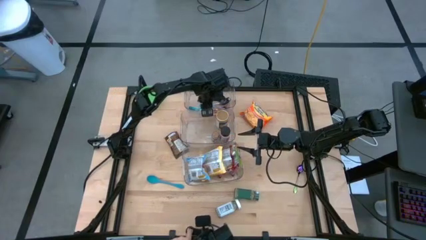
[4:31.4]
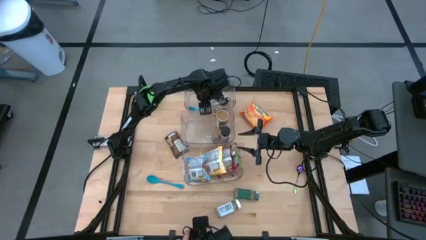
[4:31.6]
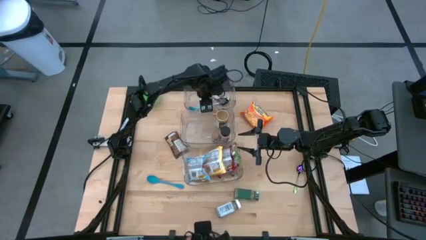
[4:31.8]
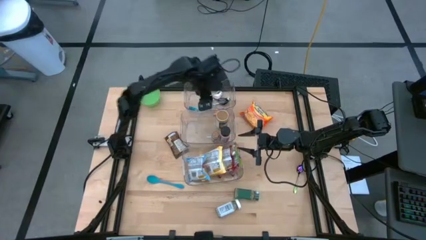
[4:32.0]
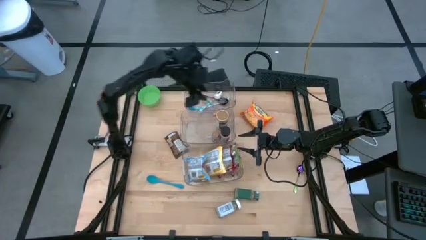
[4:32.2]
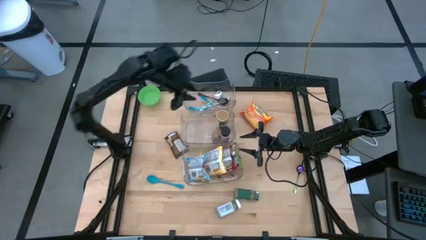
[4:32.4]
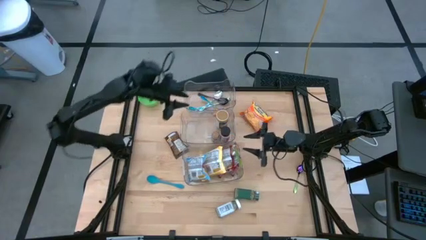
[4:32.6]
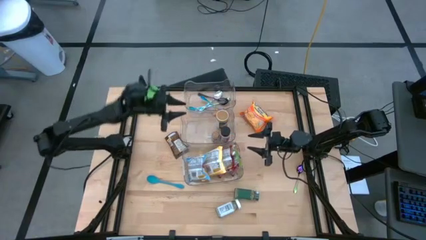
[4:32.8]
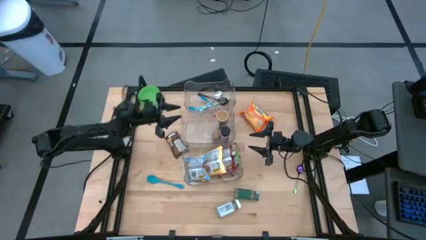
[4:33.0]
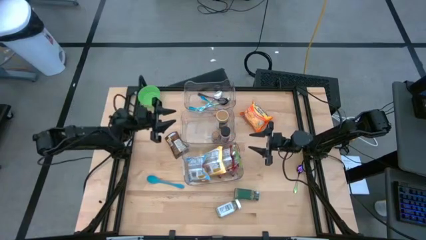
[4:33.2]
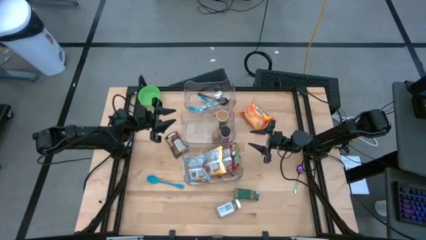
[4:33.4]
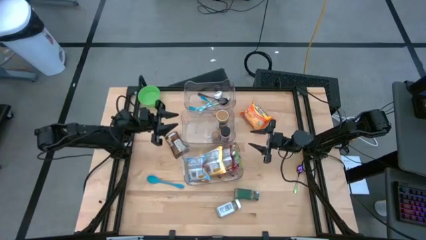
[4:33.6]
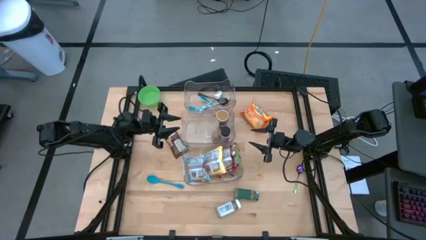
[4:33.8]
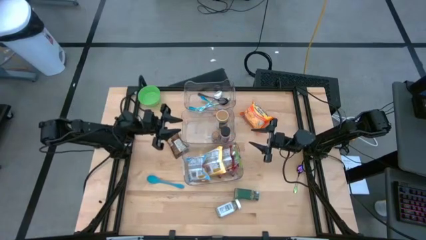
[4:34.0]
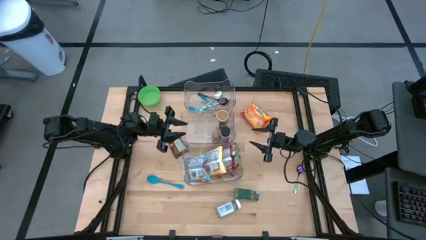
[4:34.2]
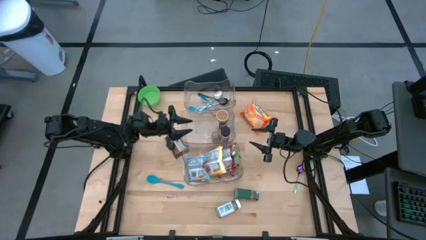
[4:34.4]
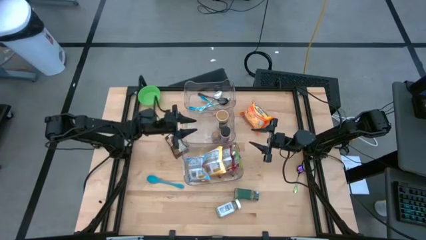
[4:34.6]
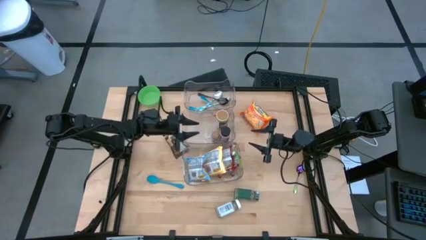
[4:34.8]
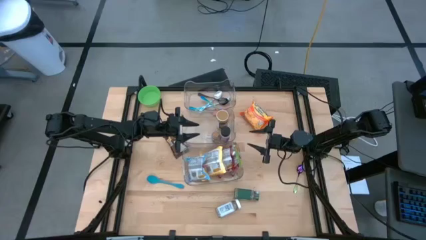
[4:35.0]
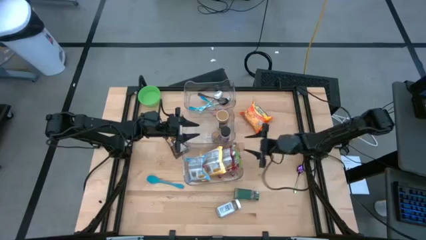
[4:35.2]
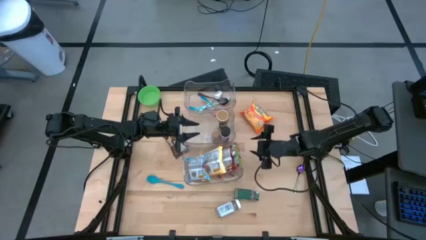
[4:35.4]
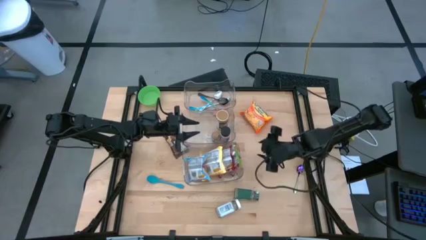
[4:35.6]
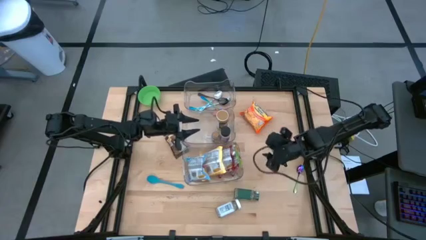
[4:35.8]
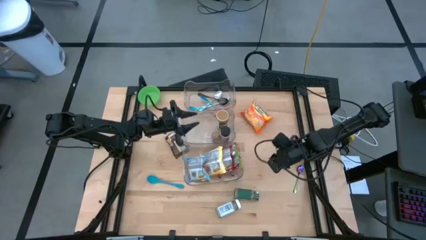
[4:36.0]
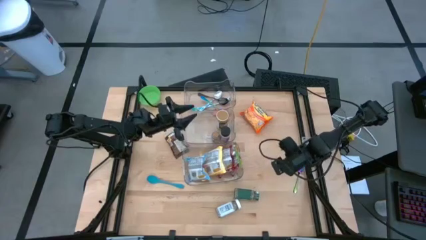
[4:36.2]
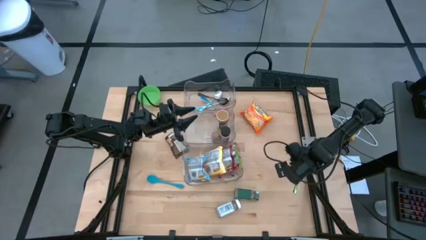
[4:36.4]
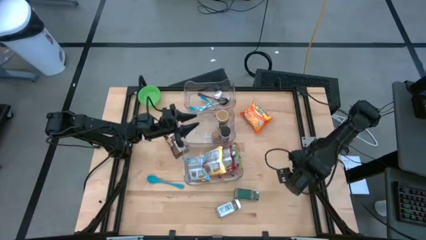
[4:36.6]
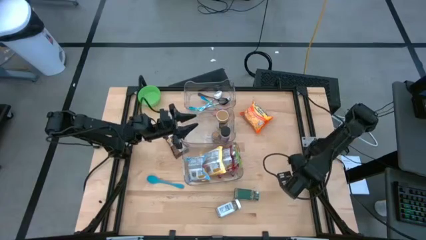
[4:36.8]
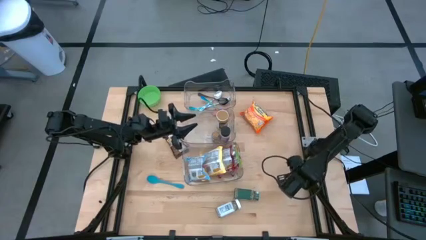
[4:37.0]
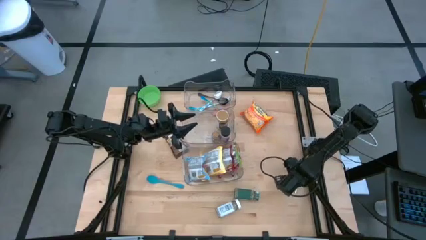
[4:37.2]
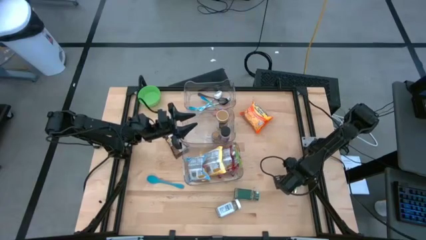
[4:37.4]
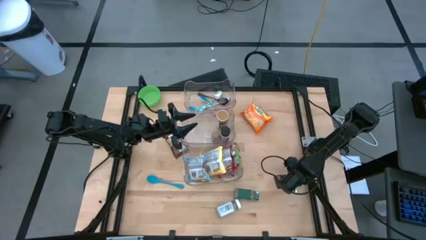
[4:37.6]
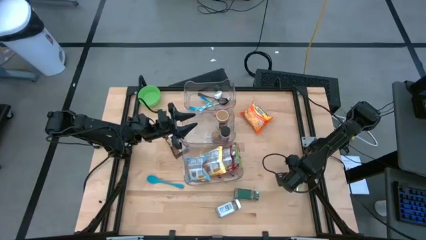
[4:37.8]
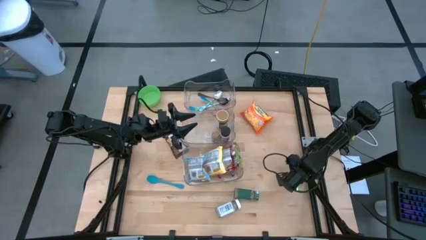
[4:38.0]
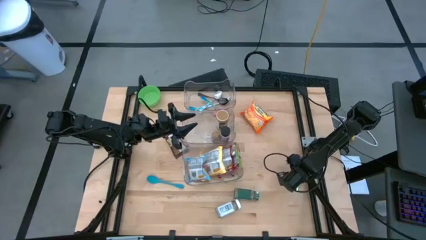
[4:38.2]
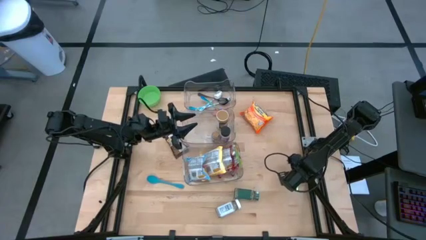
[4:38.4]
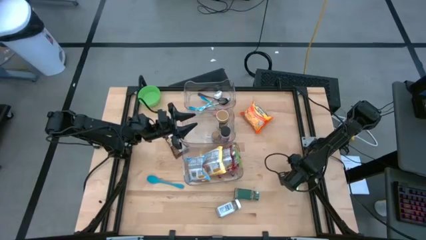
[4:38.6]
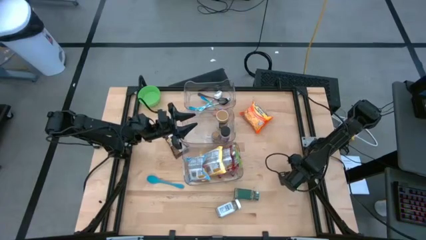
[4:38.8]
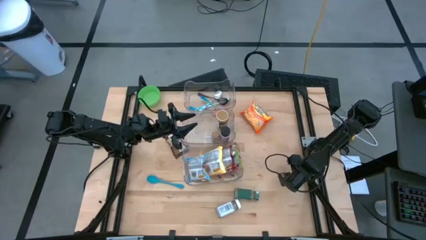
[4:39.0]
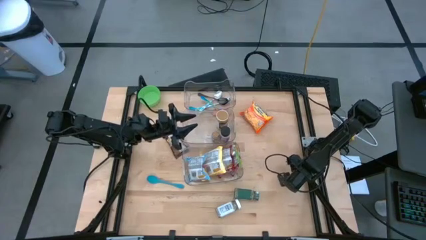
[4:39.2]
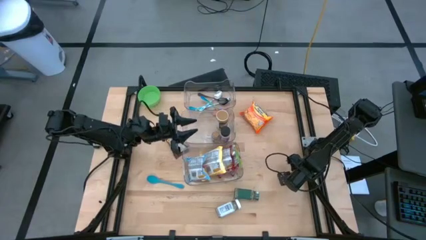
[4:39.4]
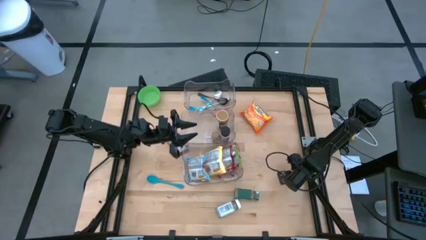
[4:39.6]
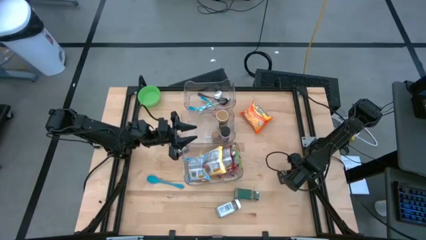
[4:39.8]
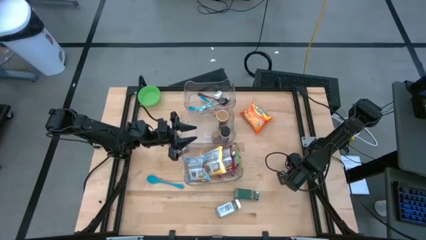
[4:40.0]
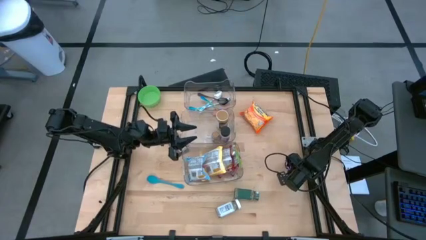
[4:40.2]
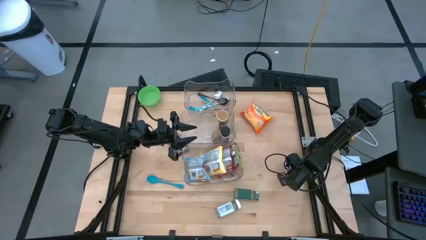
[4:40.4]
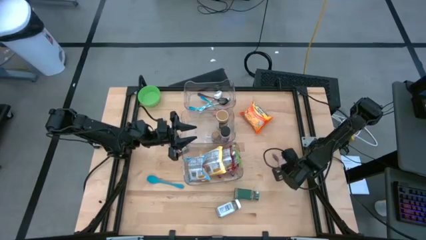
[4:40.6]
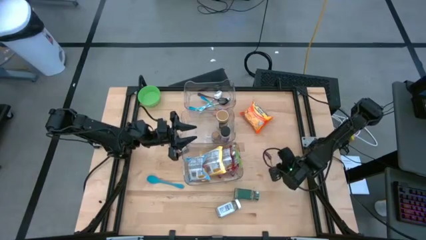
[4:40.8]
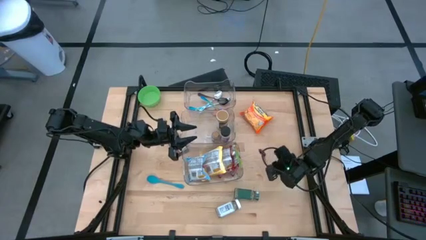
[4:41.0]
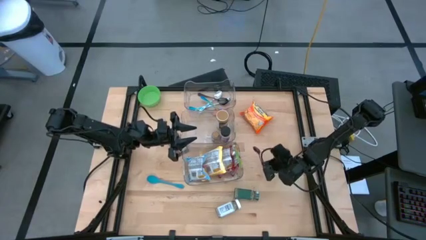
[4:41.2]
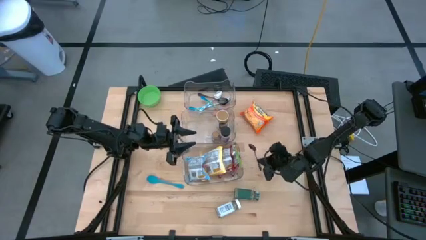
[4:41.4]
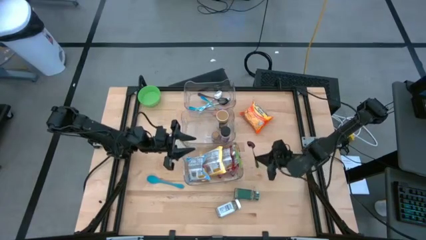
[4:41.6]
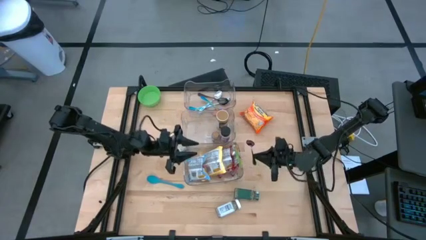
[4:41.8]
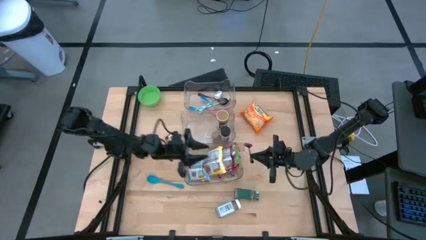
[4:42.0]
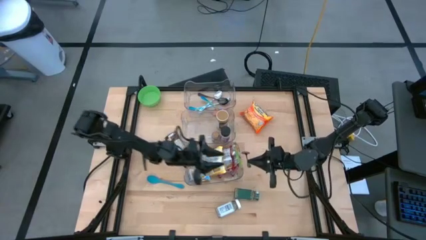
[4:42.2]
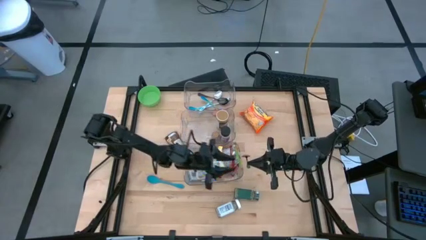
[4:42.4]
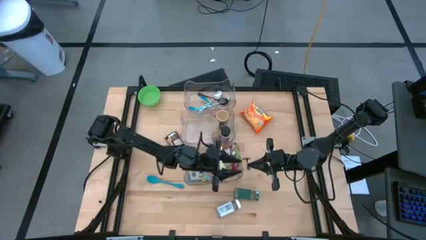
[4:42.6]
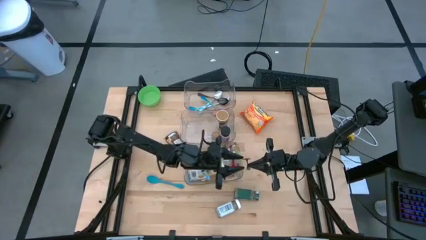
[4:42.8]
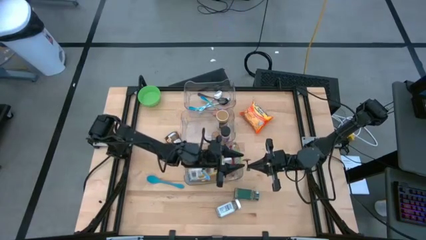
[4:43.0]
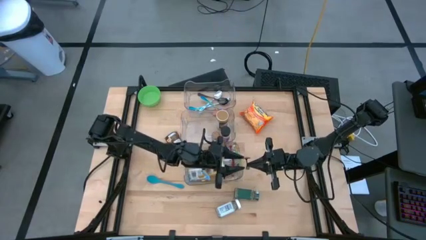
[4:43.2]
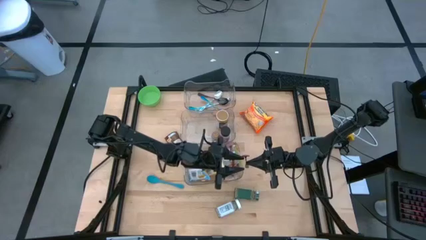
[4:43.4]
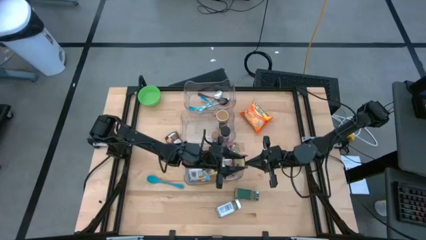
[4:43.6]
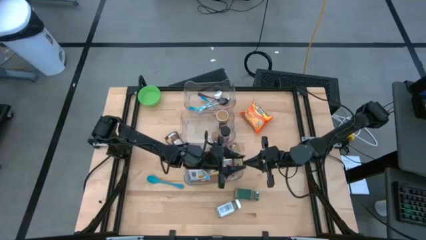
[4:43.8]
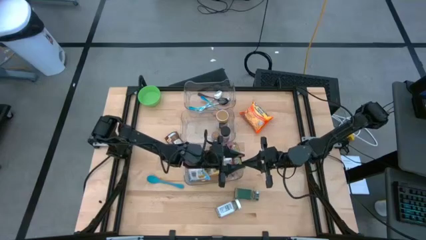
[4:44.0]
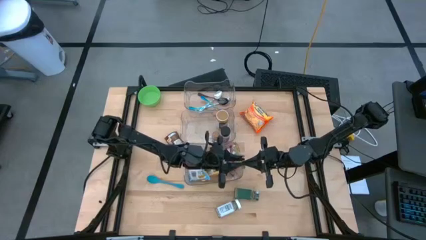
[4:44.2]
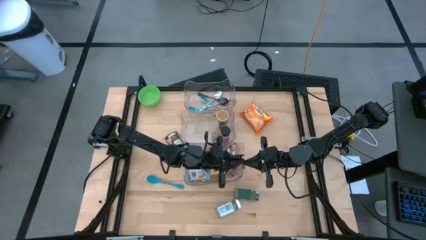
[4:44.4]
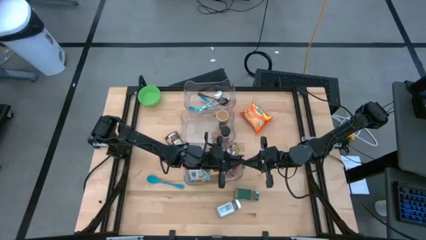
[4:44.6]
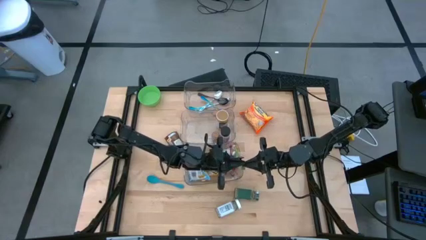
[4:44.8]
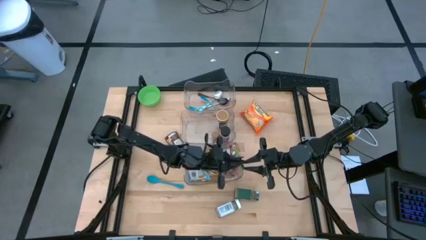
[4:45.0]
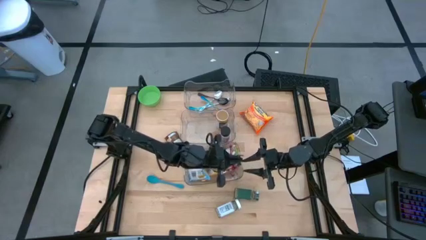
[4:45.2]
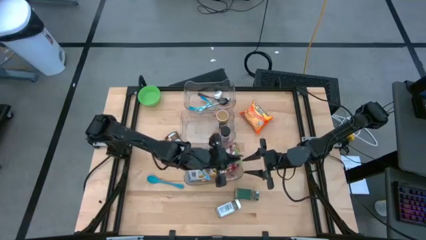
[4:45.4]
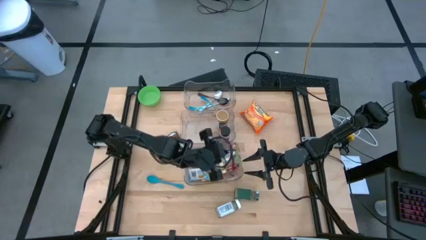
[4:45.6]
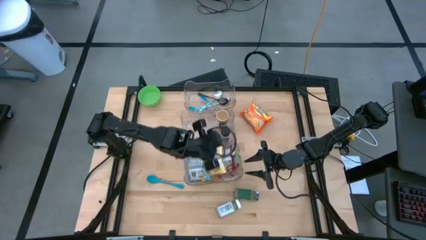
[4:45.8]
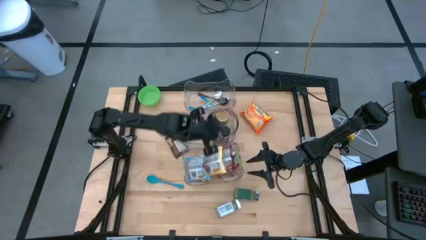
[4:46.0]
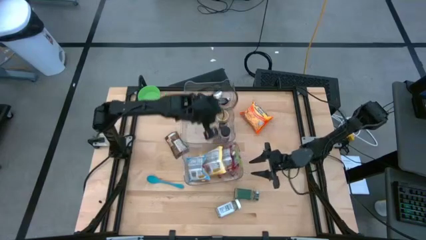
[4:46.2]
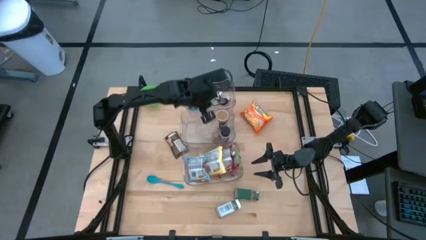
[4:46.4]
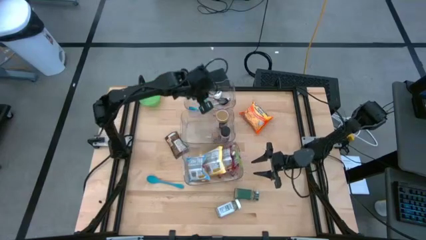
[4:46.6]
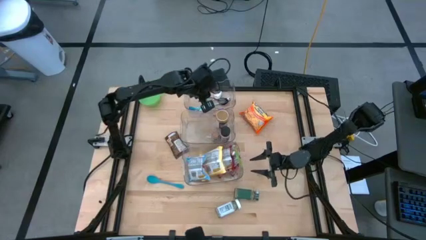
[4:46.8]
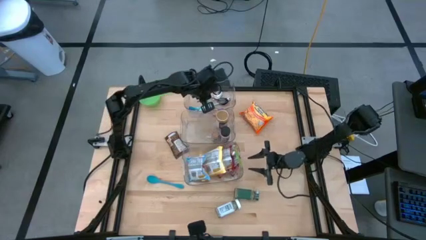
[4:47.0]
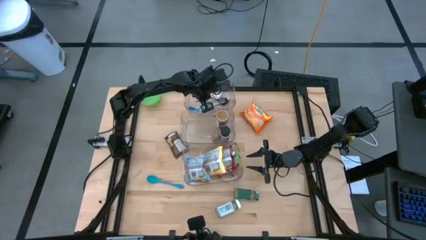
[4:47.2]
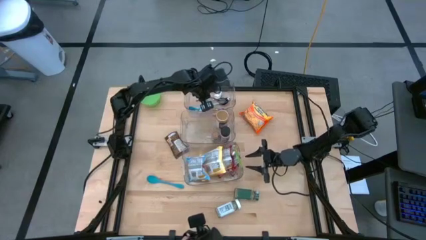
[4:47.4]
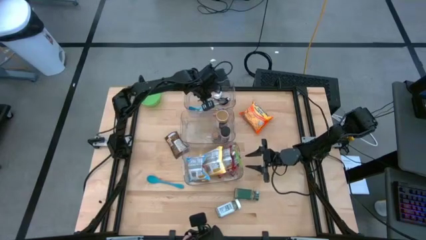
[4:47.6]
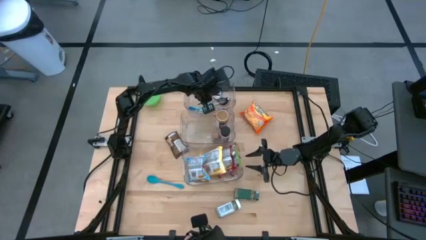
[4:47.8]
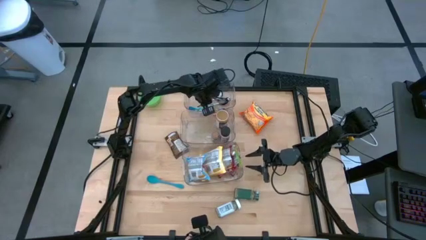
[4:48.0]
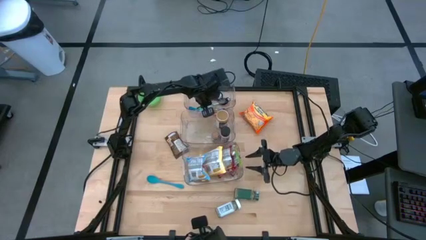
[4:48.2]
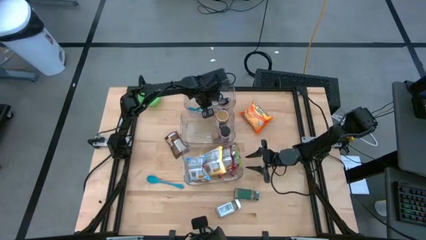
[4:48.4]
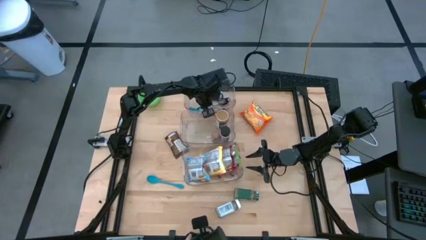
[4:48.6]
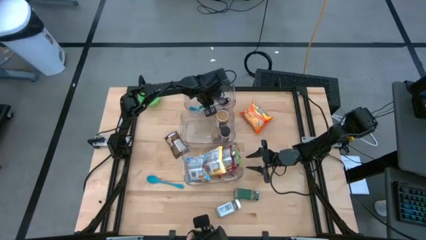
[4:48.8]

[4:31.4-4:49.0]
Task: Pick & Place Food Item
Put the blue spoon into the top transparent bin
